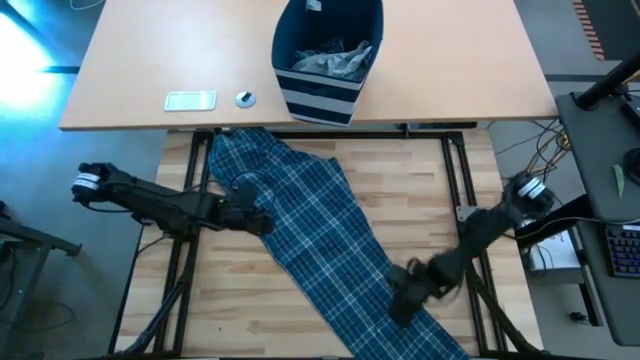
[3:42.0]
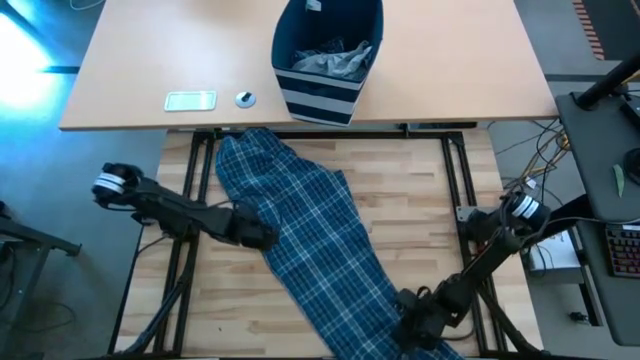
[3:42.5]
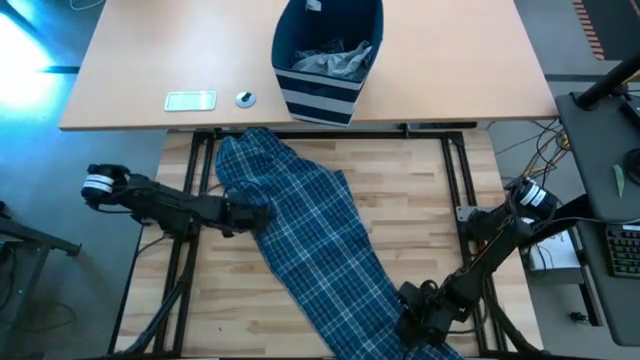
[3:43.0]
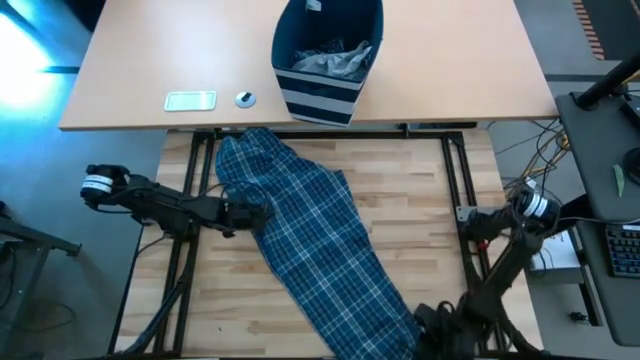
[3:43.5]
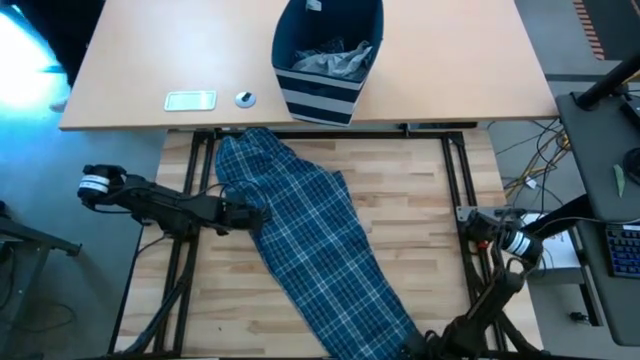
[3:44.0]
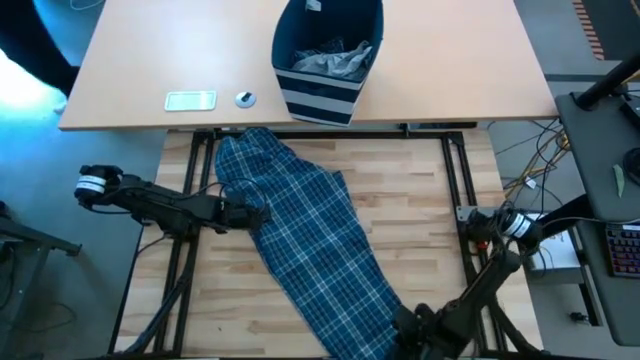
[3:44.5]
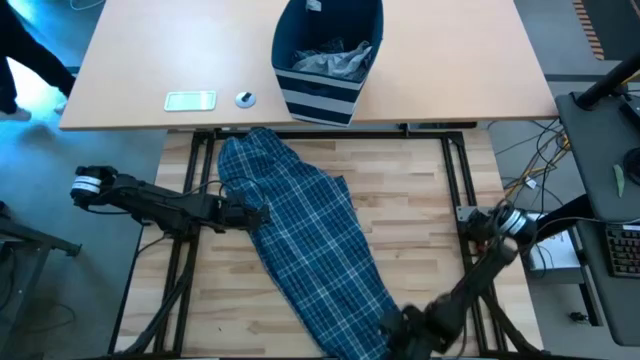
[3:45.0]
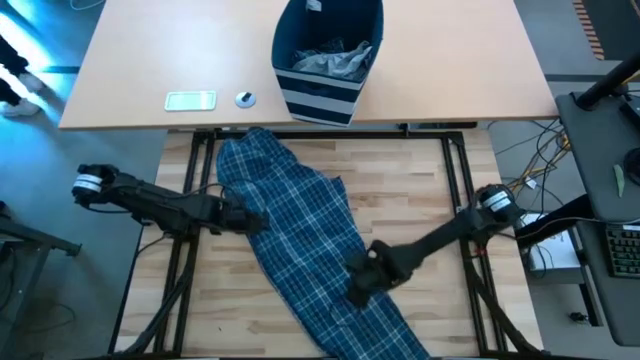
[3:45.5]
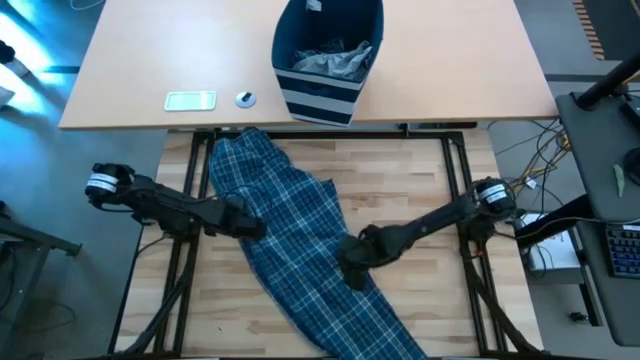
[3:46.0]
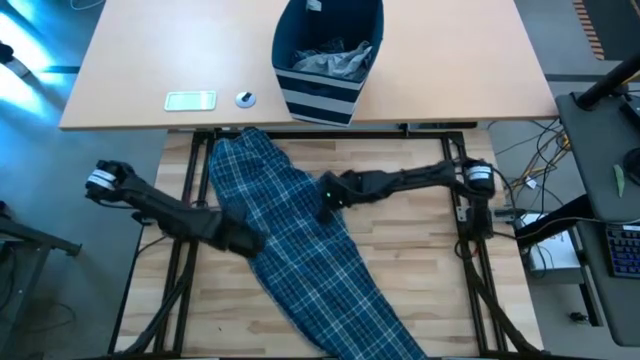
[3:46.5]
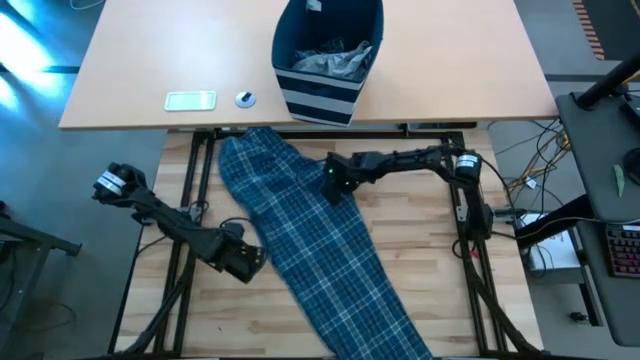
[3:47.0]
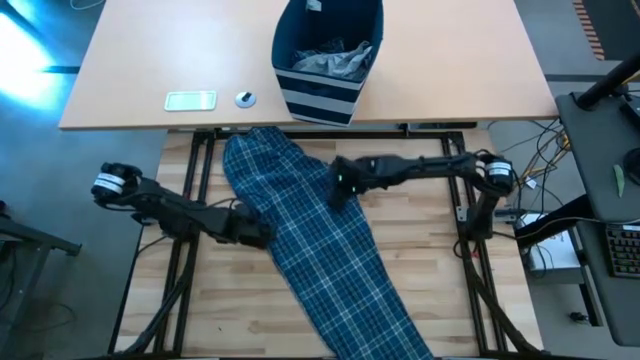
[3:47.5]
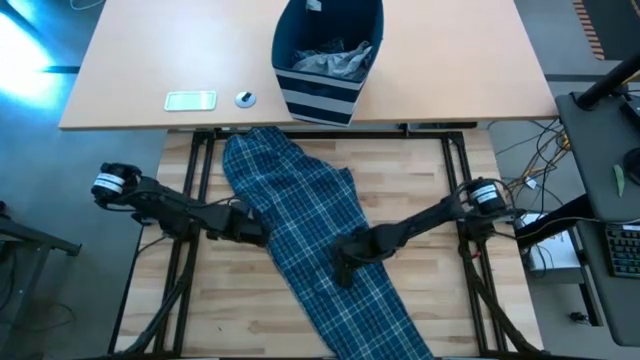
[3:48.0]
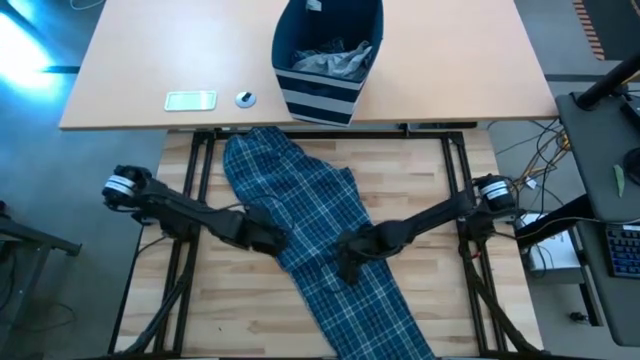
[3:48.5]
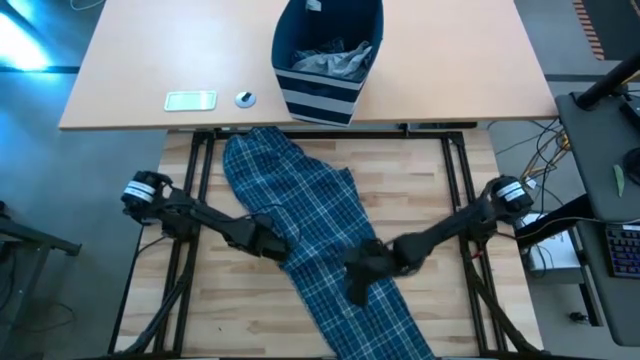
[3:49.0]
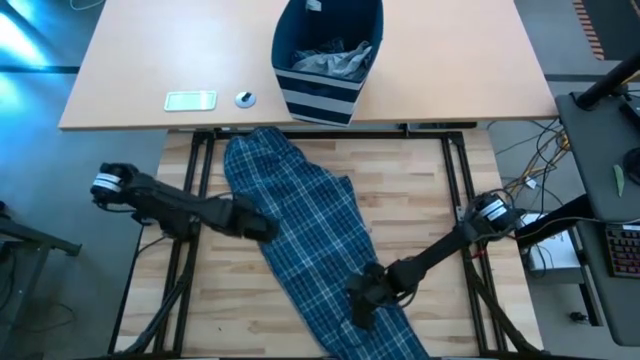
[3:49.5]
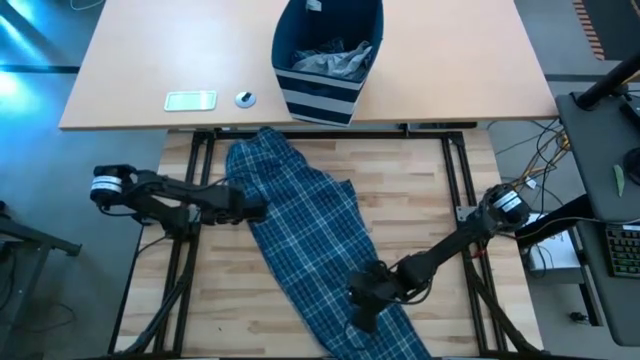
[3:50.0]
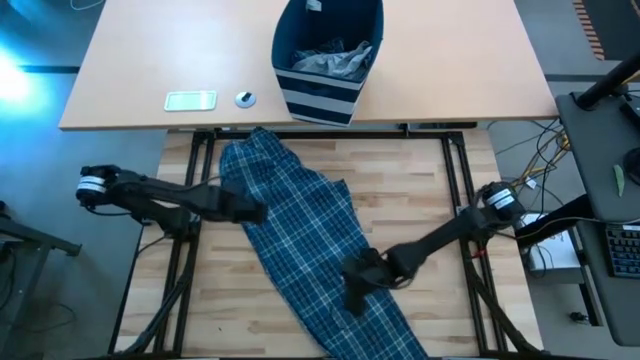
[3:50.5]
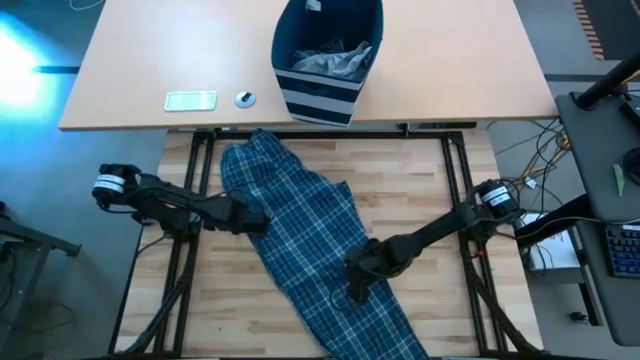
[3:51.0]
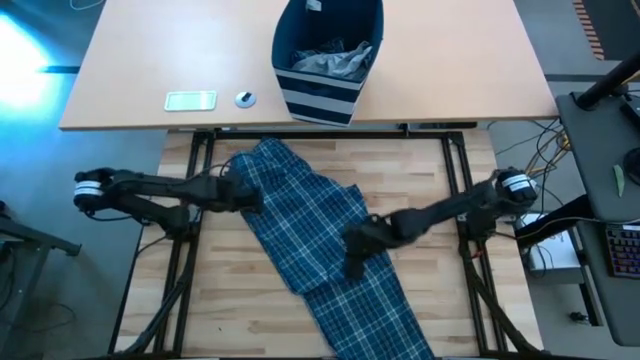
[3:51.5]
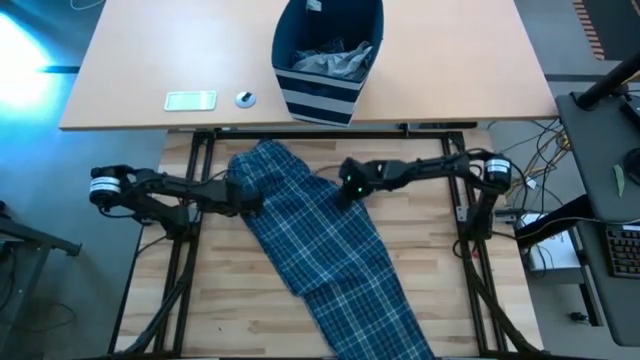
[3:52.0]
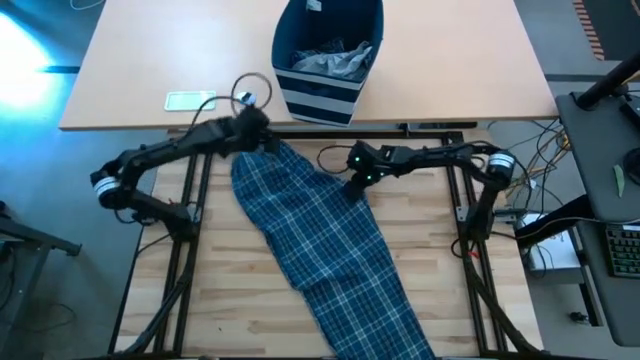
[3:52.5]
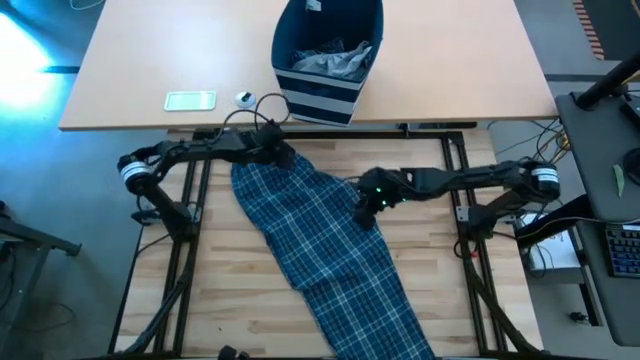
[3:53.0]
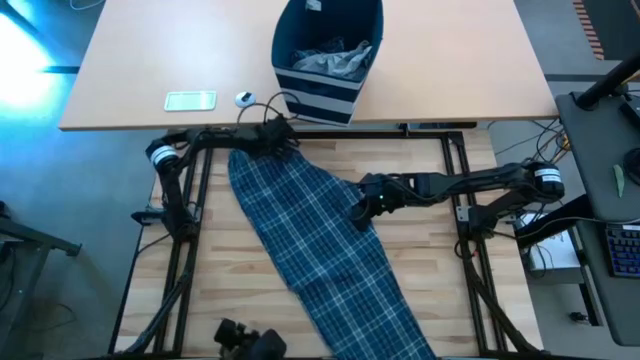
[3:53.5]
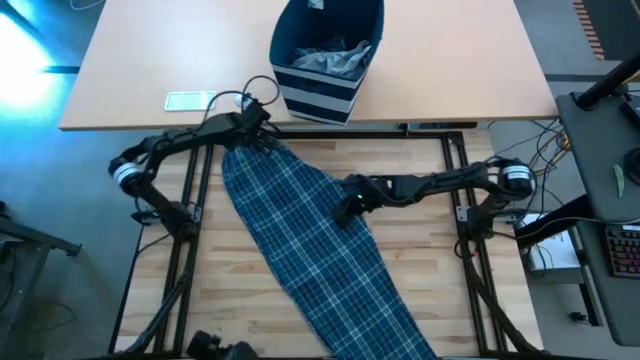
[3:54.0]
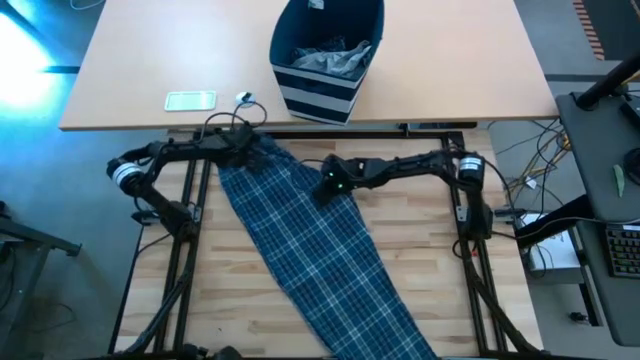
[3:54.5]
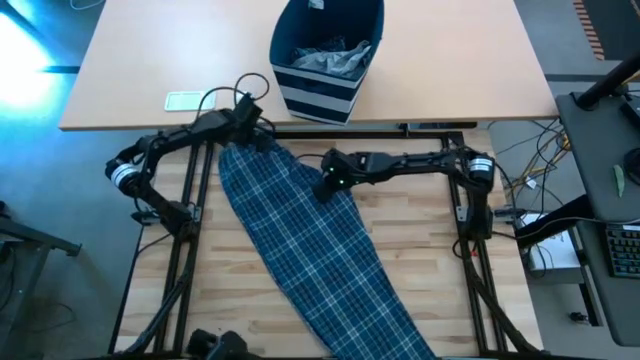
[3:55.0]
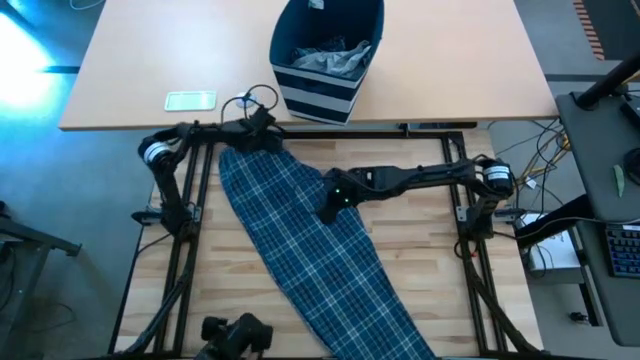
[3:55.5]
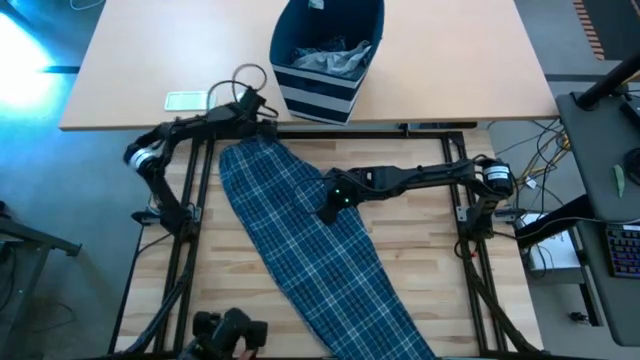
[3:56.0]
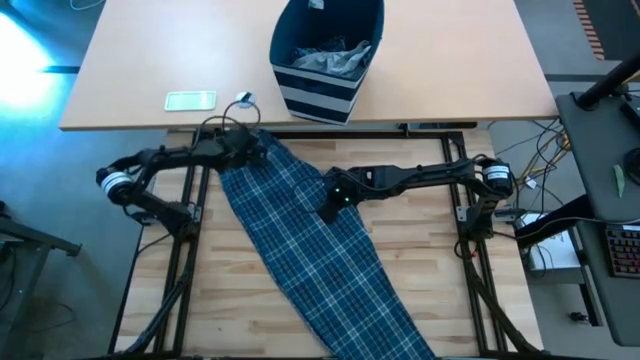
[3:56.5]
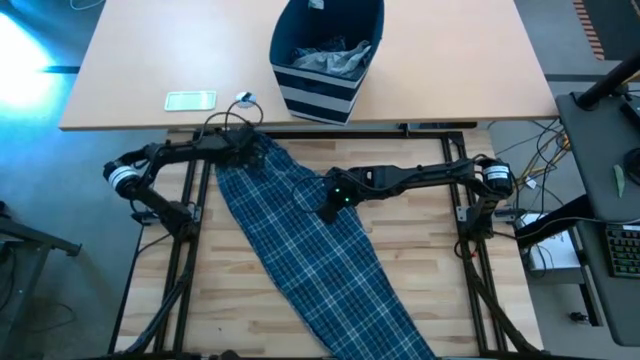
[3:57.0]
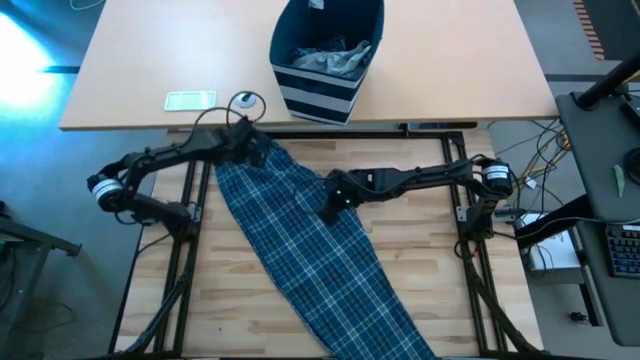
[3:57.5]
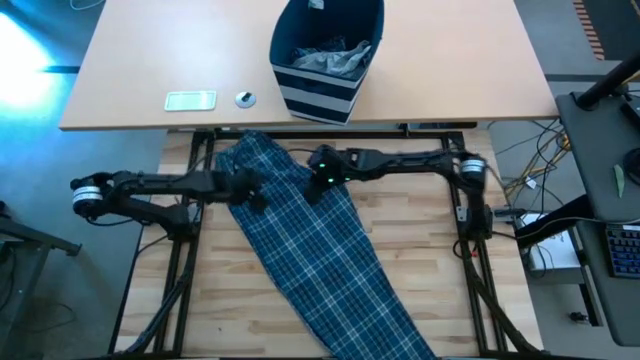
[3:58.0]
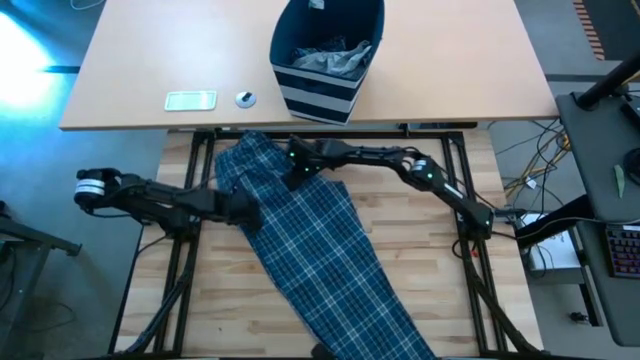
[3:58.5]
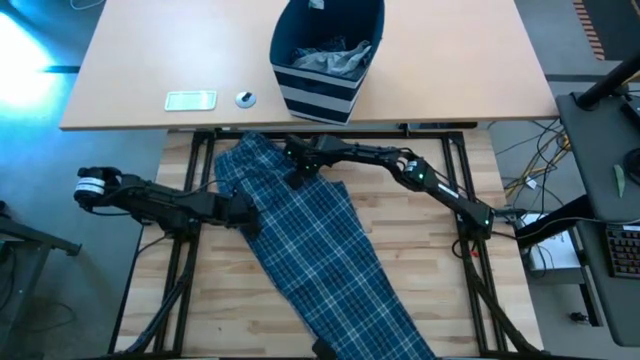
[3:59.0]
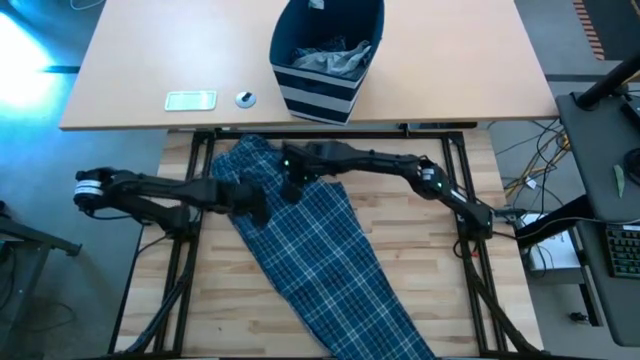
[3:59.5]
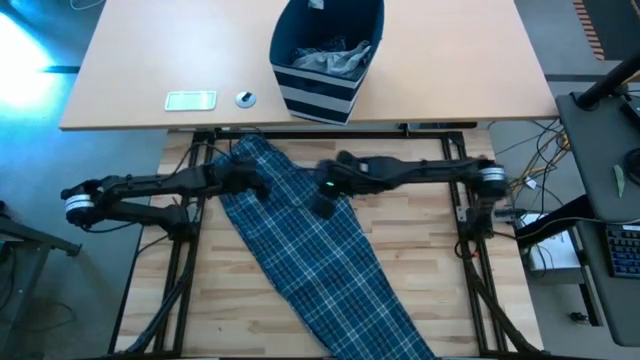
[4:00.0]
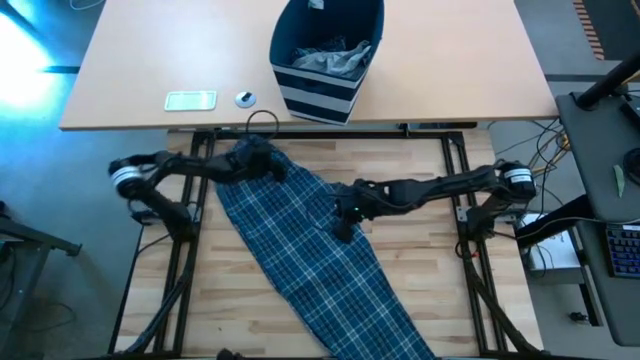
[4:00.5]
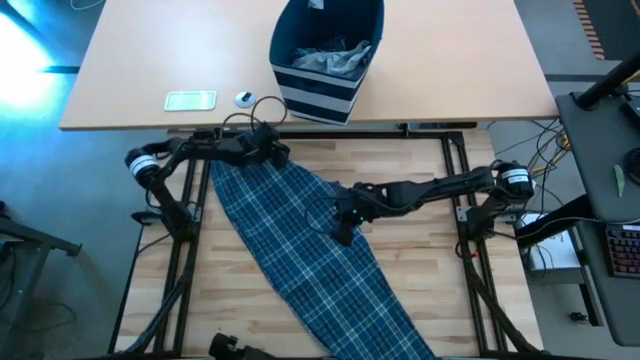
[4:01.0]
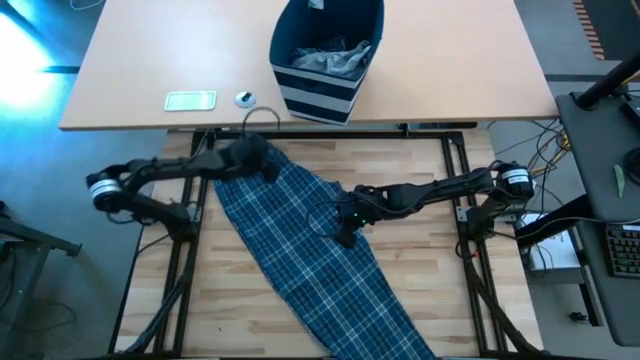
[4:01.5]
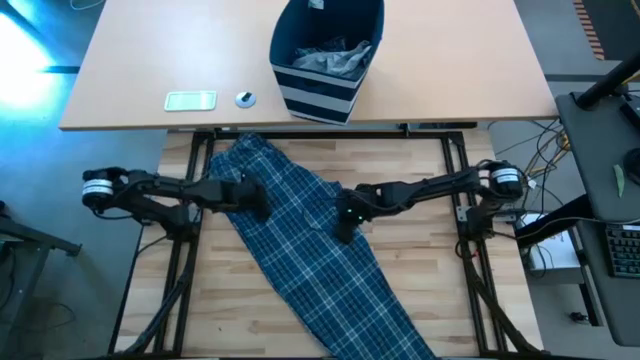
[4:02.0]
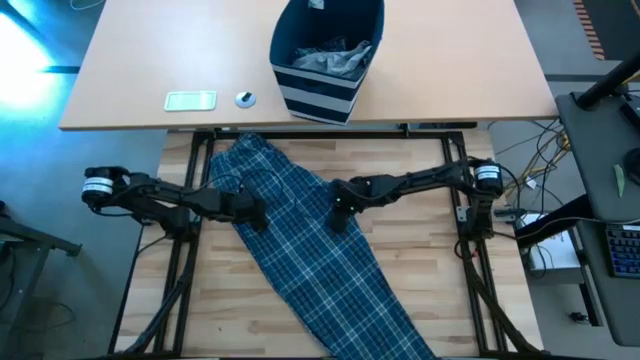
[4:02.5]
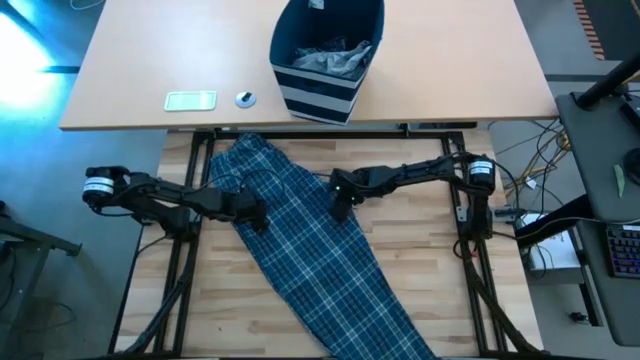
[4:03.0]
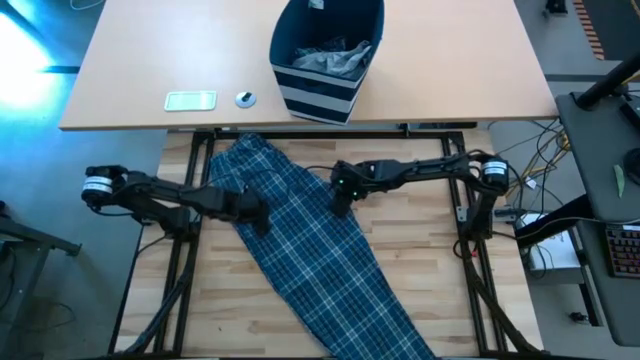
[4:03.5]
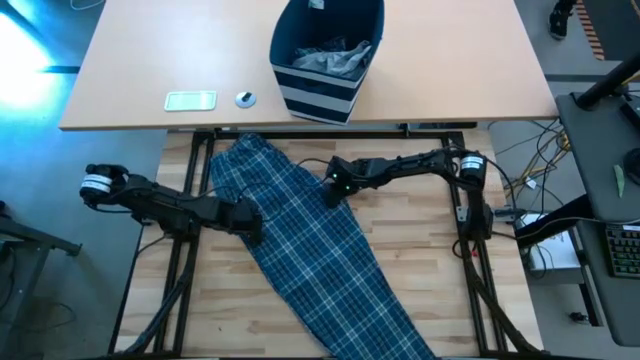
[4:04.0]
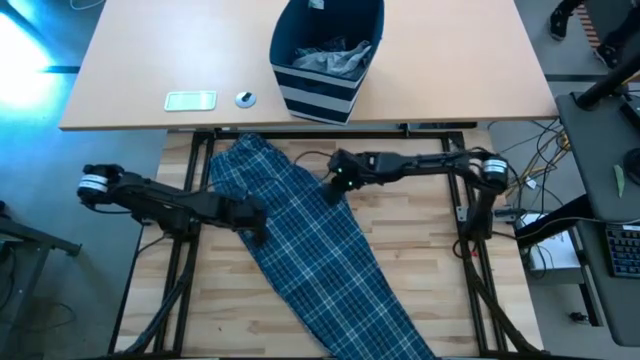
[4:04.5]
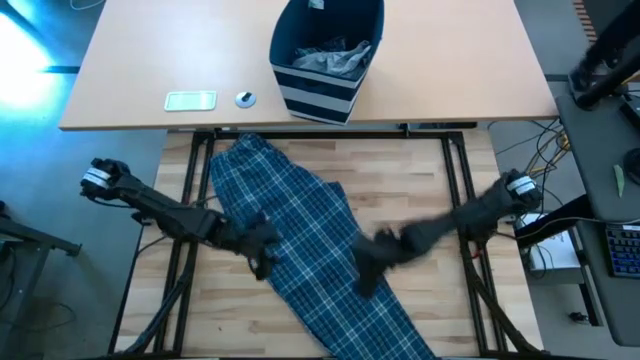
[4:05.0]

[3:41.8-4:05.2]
Task: Fold Laundry from Bin
Fold the blue patterned pants
